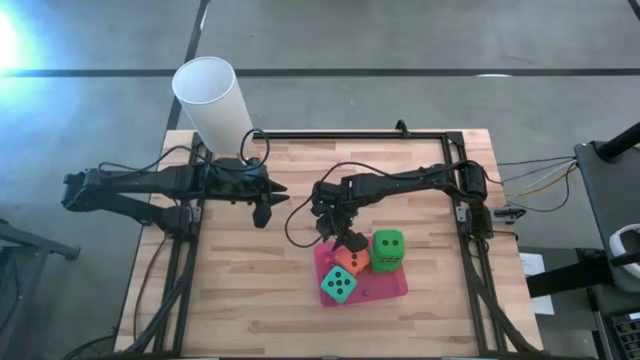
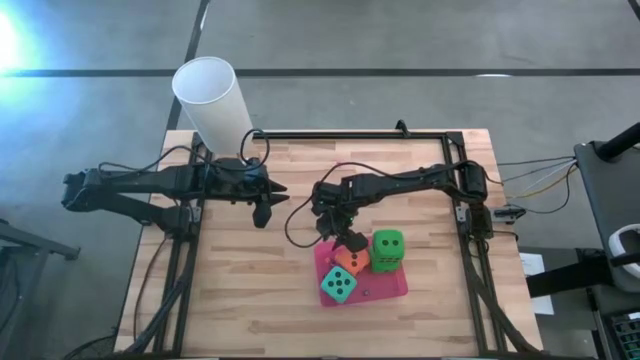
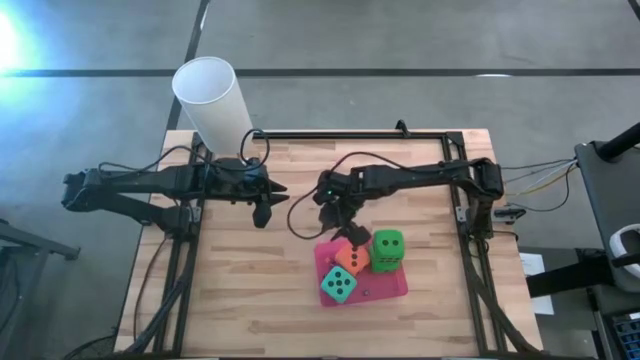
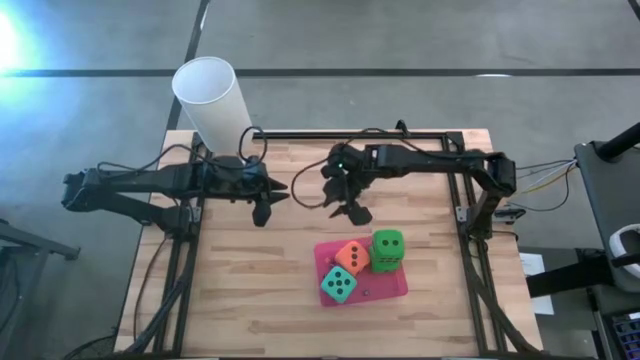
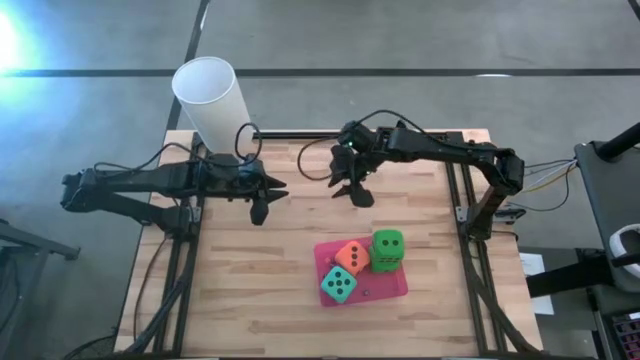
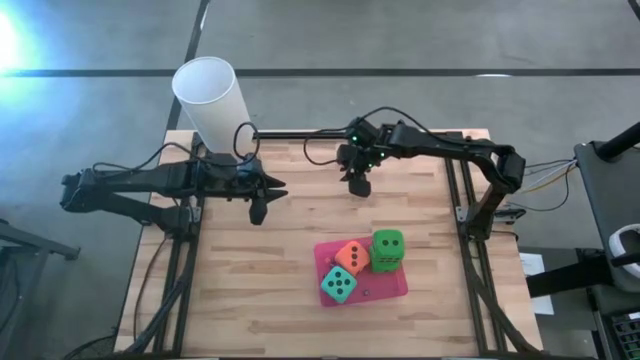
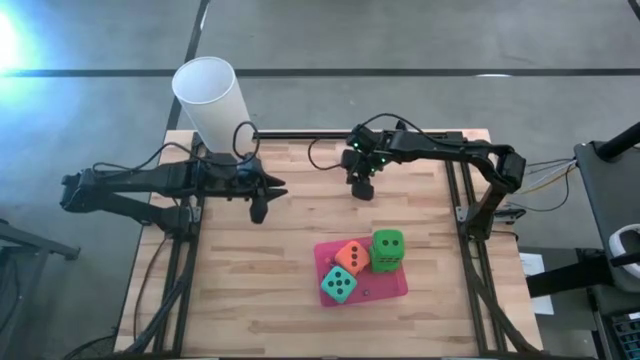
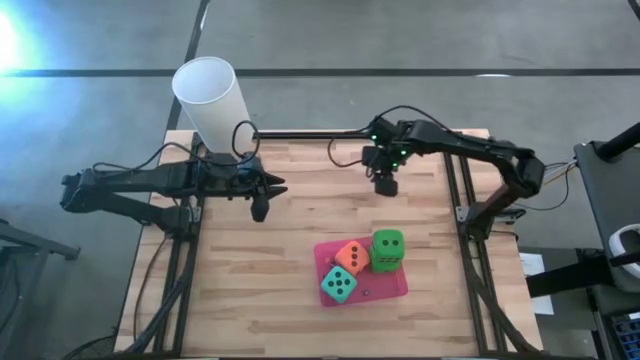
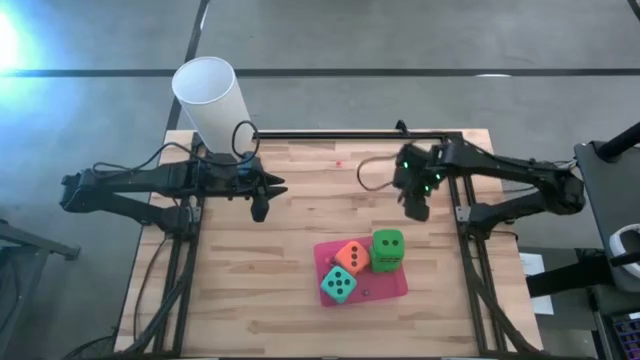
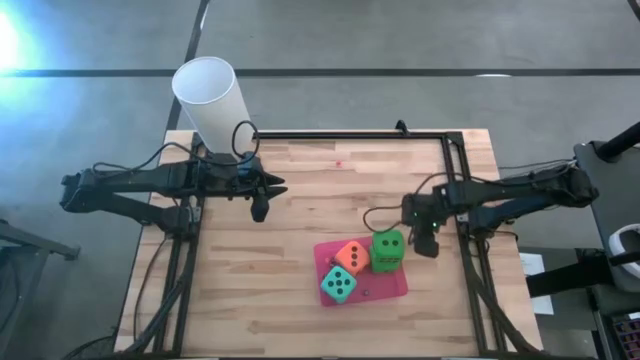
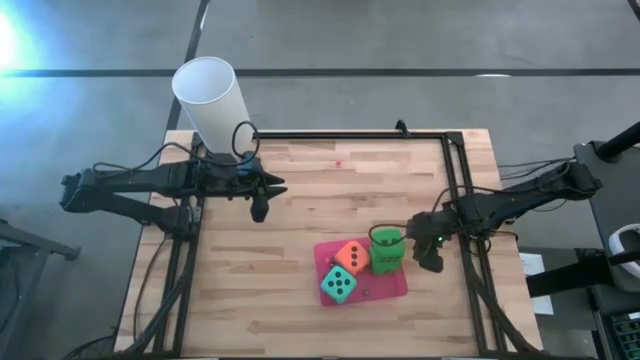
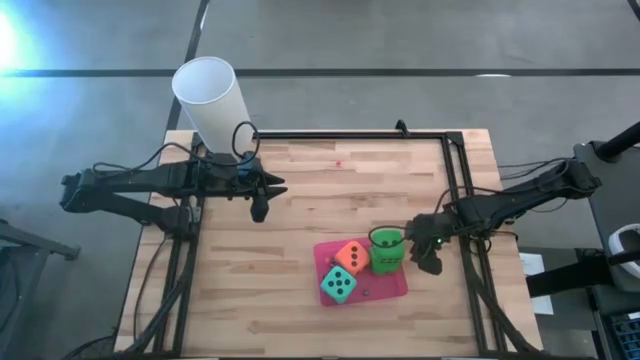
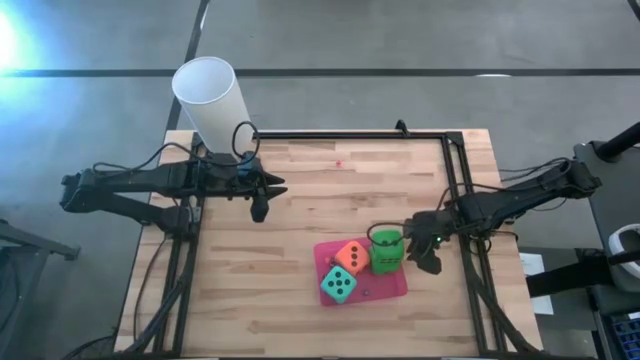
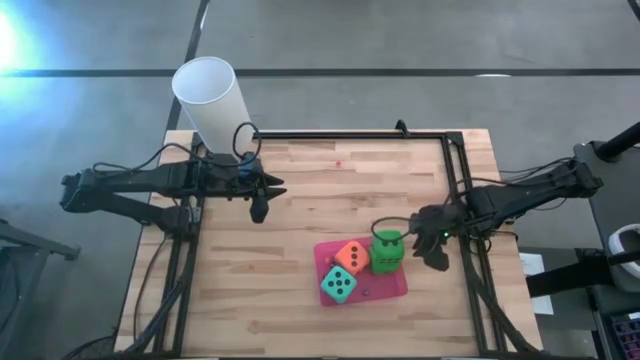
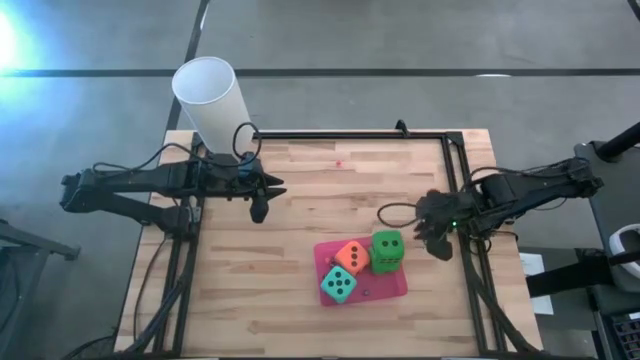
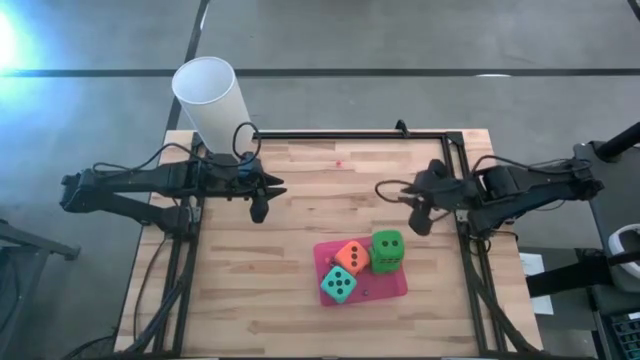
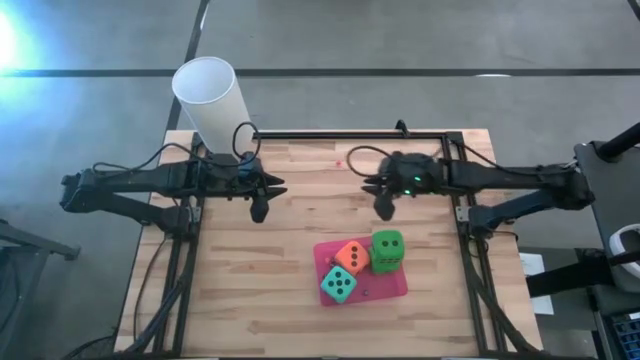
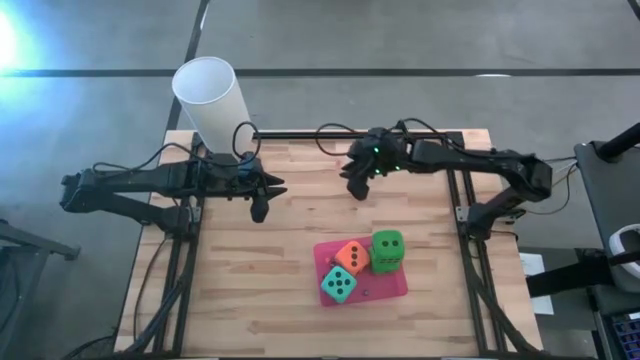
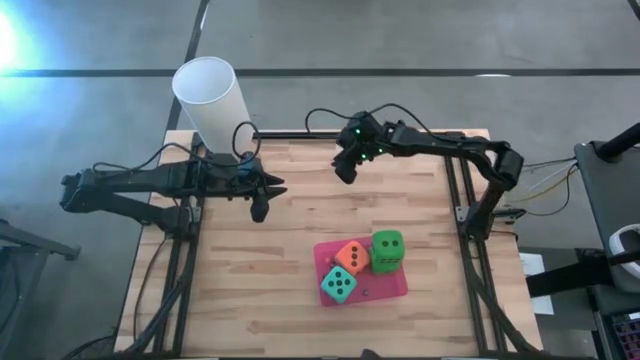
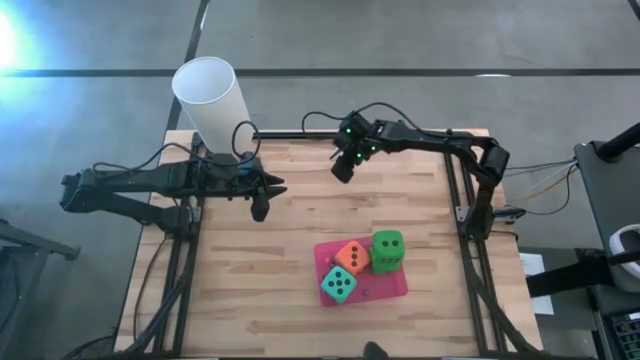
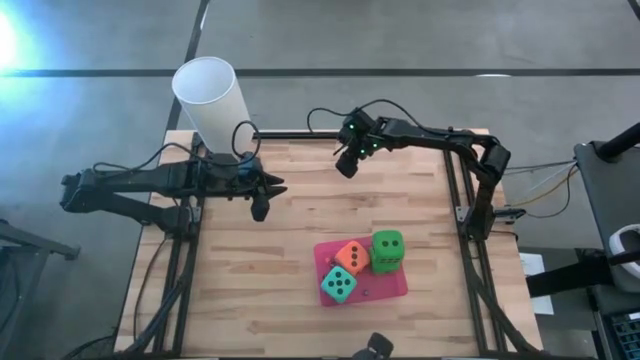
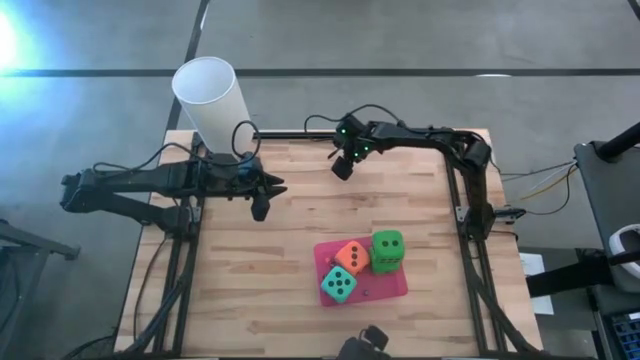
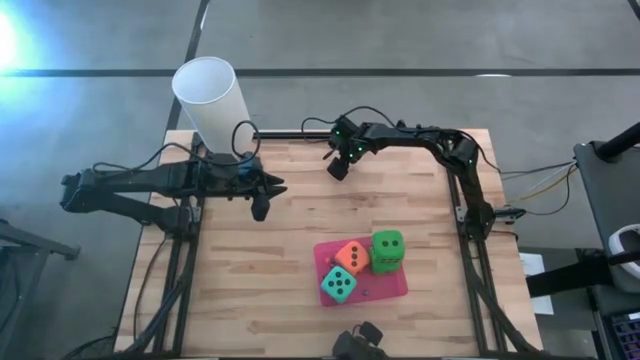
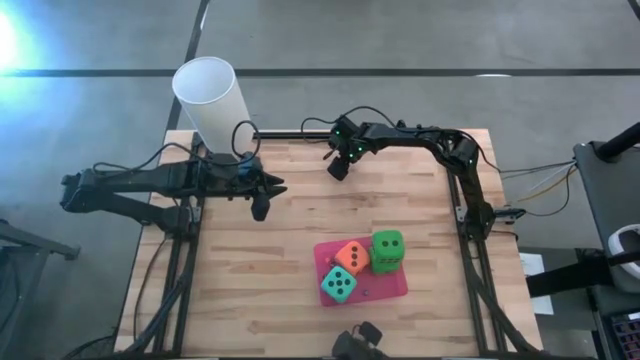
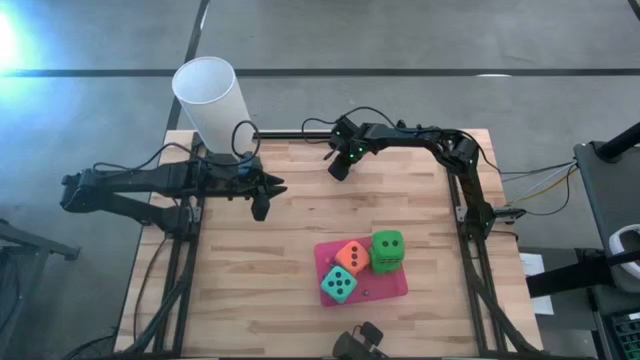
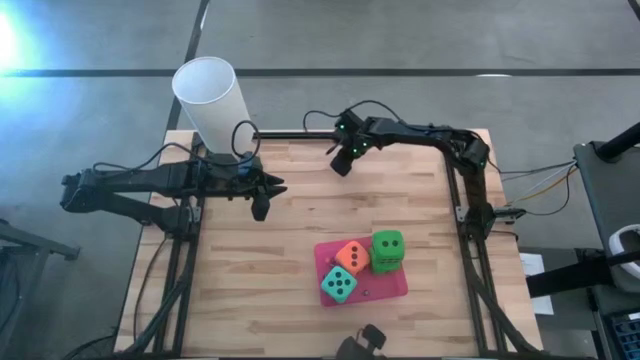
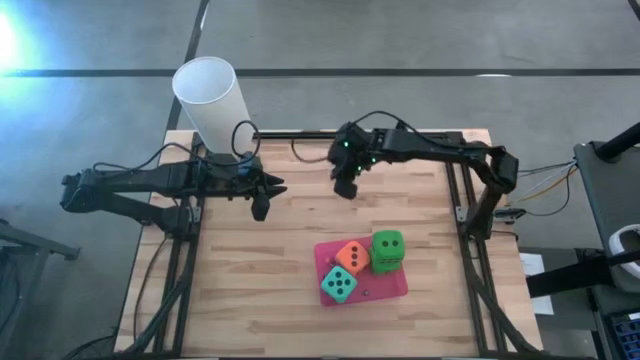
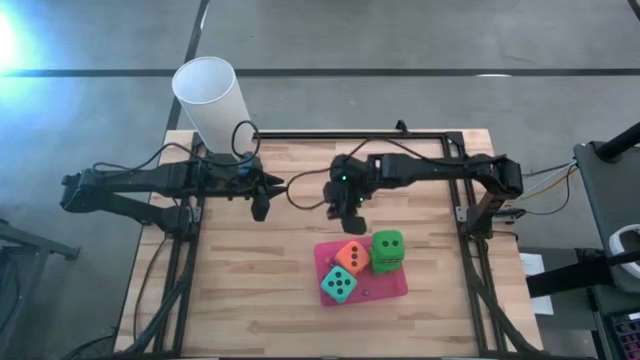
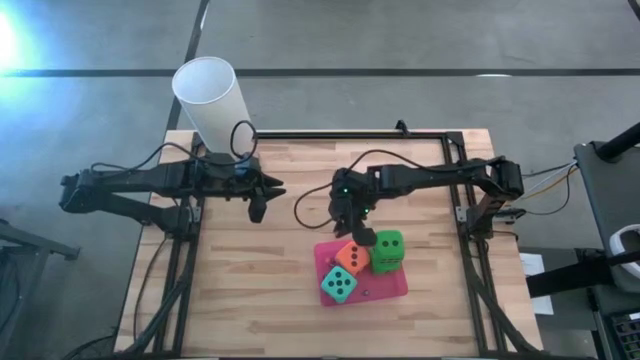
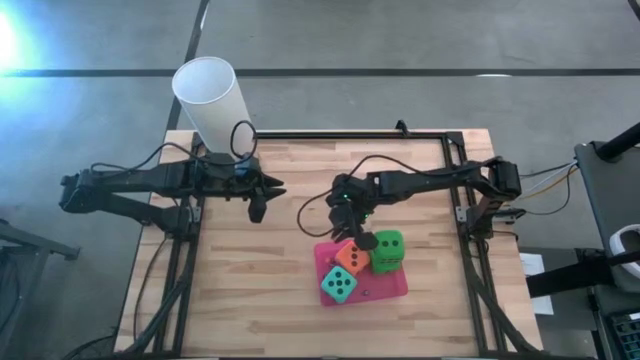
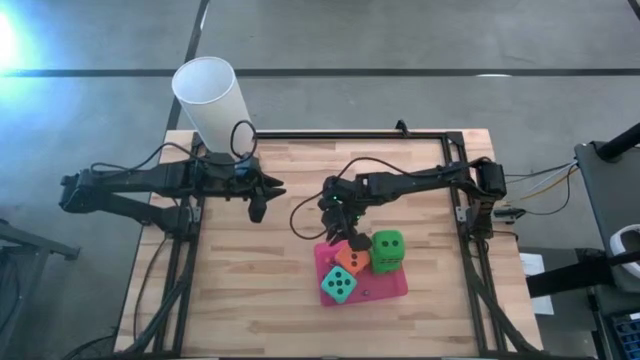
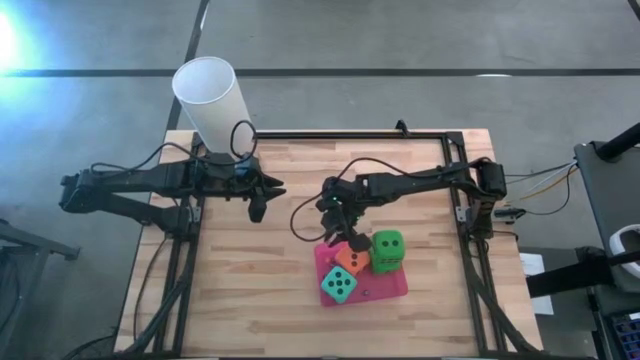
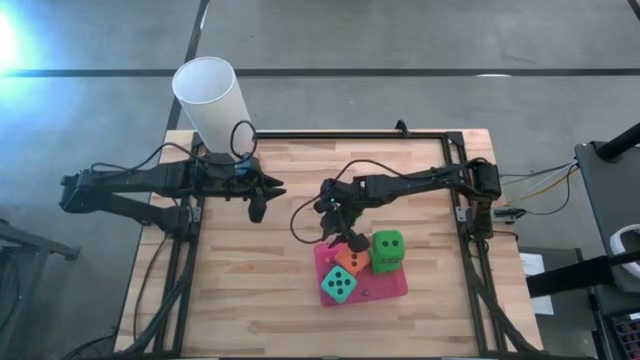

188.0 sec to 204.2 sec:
Task: Pick & Place Dice
Put the small red dice into the pink bin

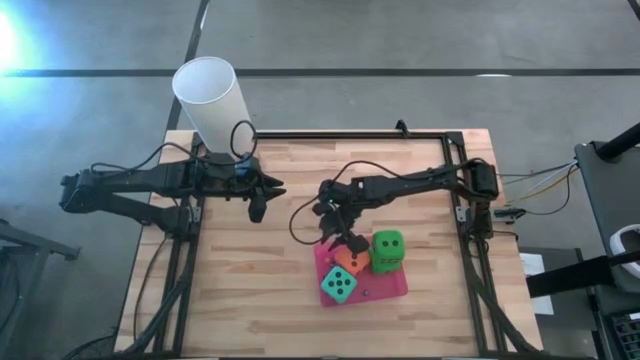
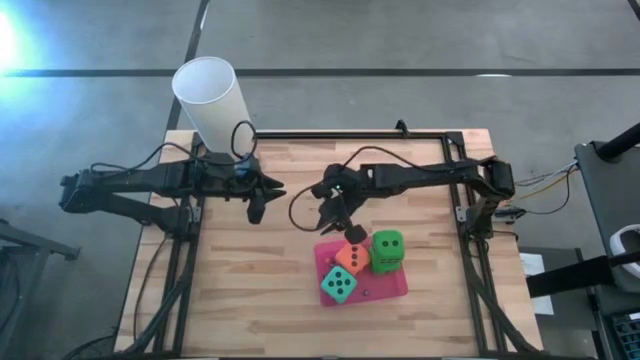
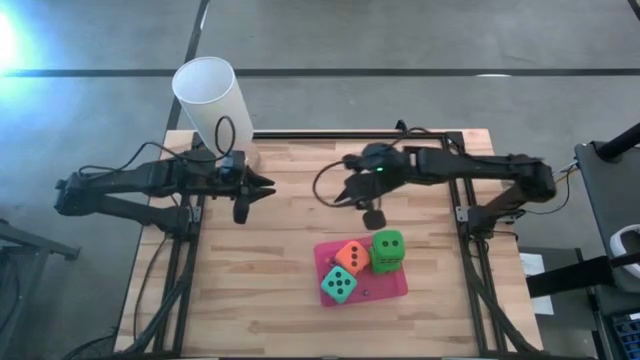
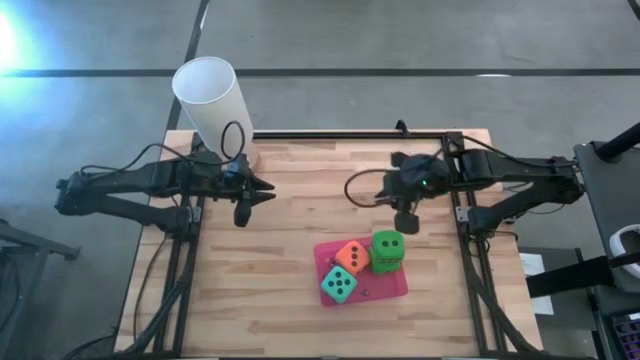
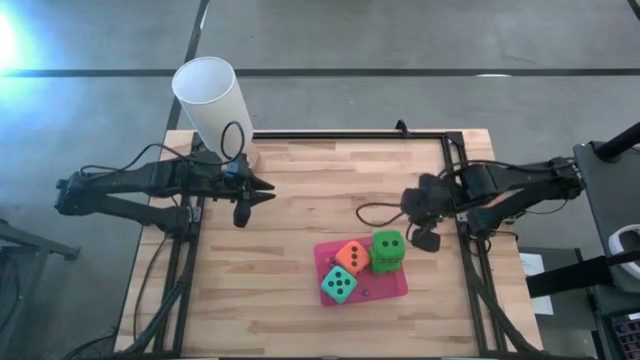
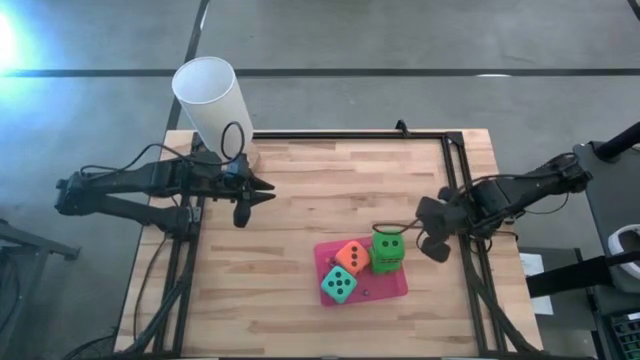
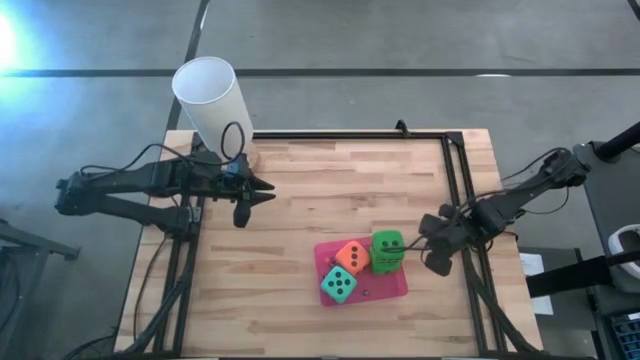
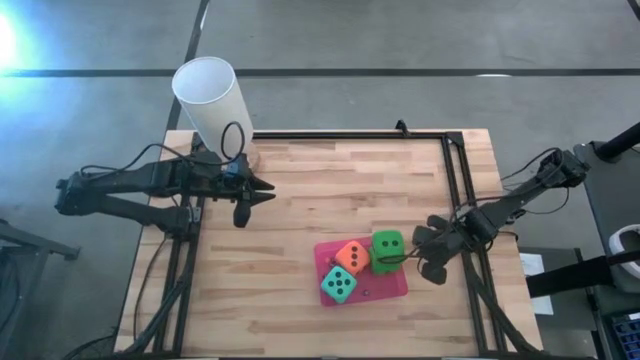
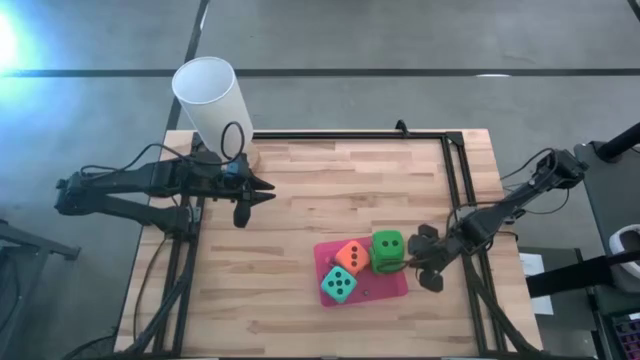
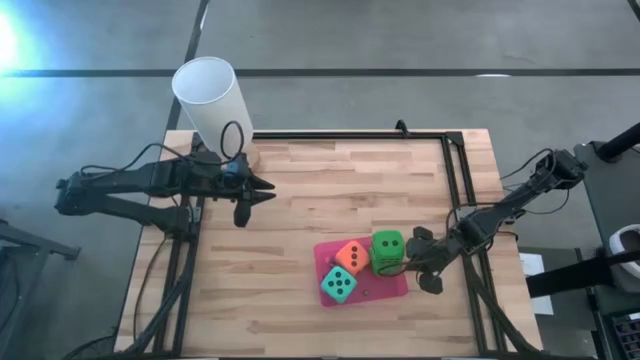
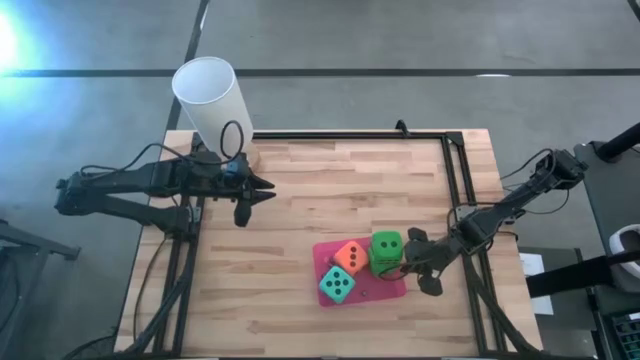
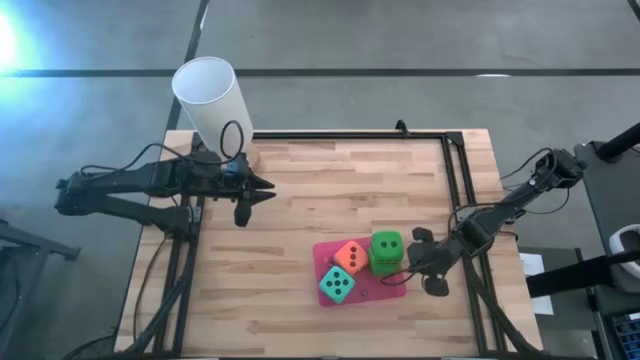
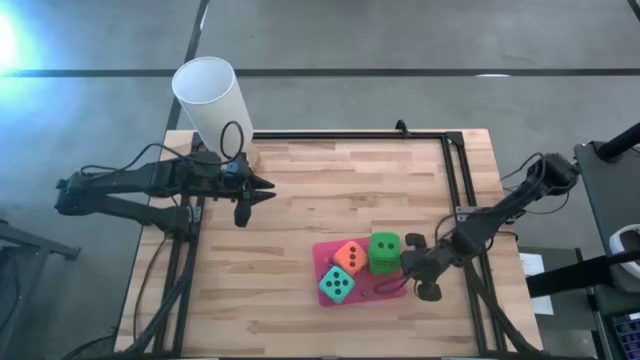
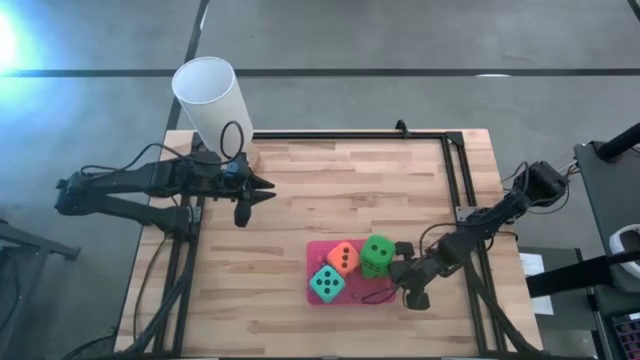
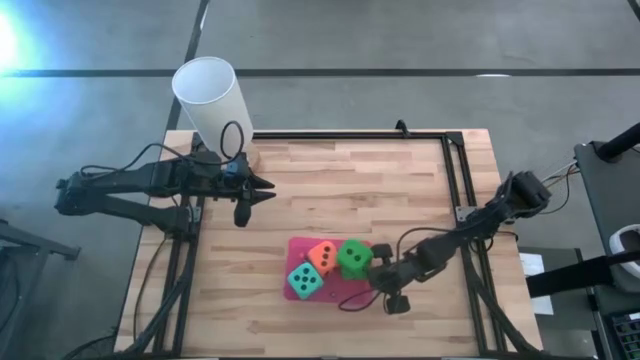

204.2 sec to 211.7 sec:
Adjust the pink bin
